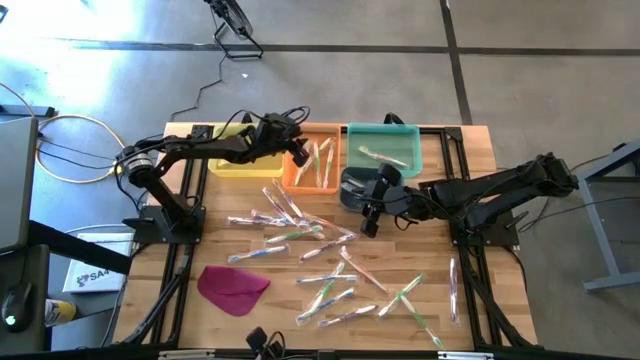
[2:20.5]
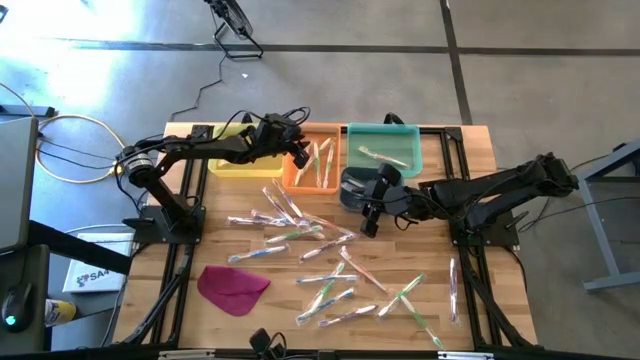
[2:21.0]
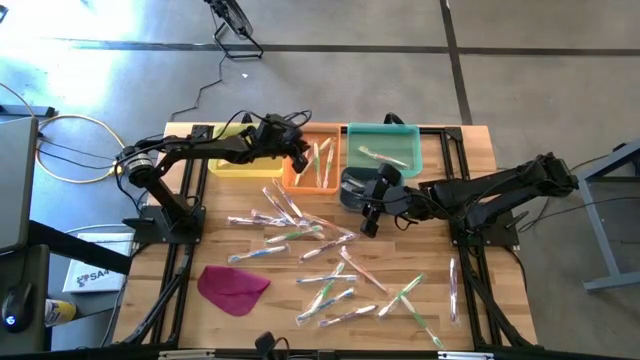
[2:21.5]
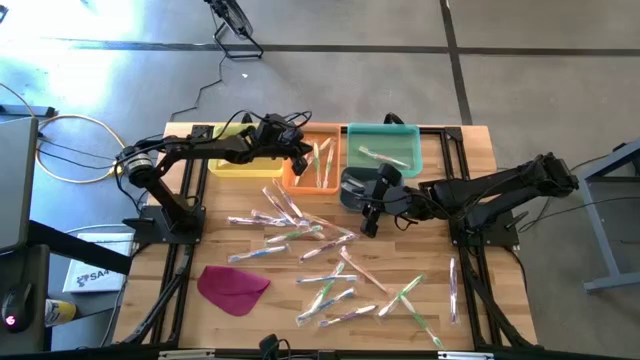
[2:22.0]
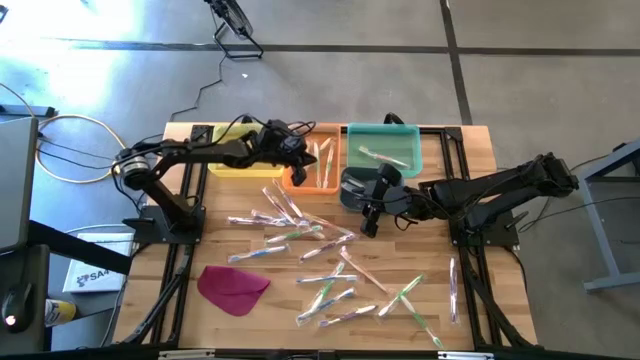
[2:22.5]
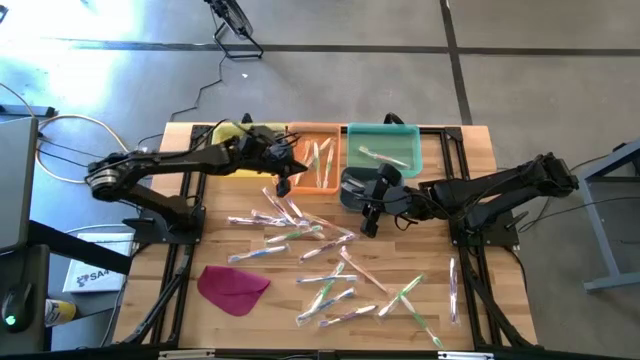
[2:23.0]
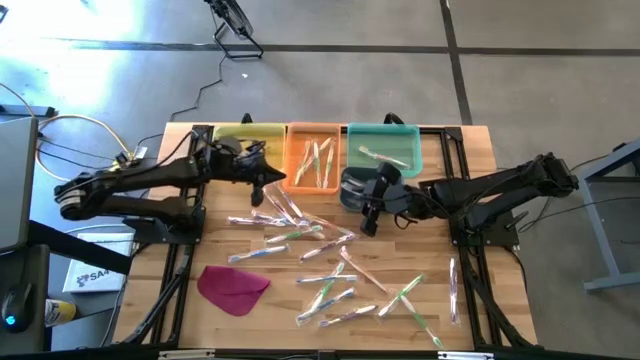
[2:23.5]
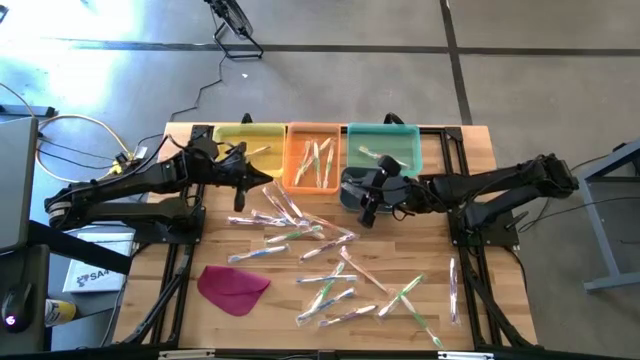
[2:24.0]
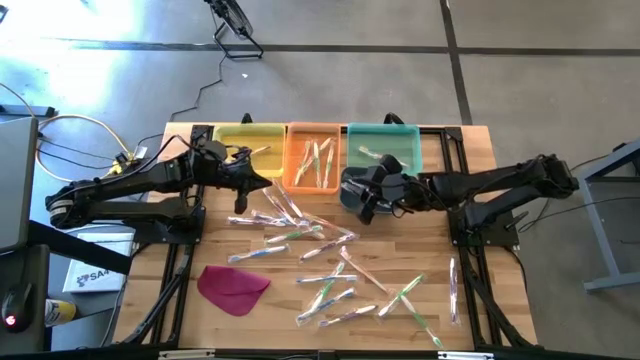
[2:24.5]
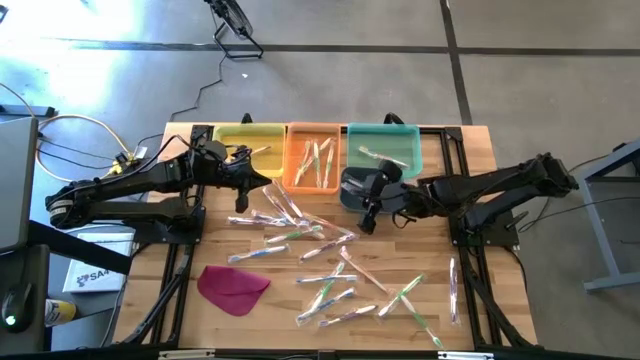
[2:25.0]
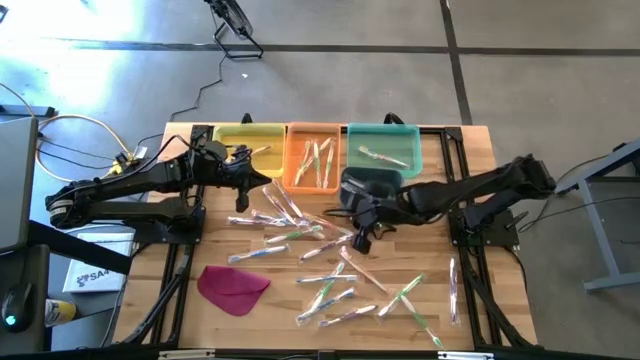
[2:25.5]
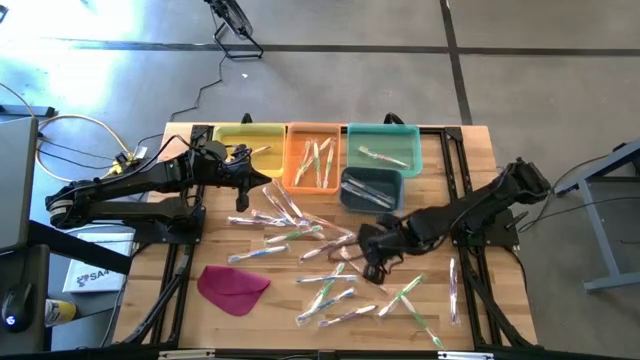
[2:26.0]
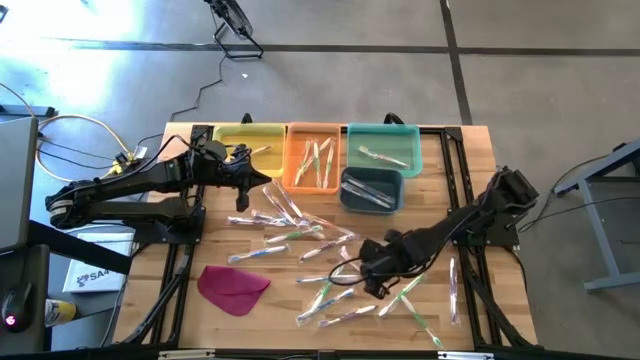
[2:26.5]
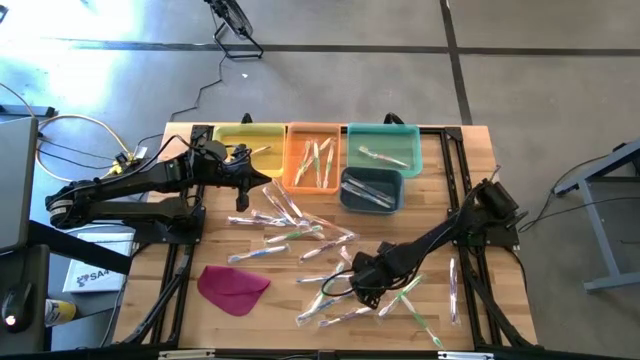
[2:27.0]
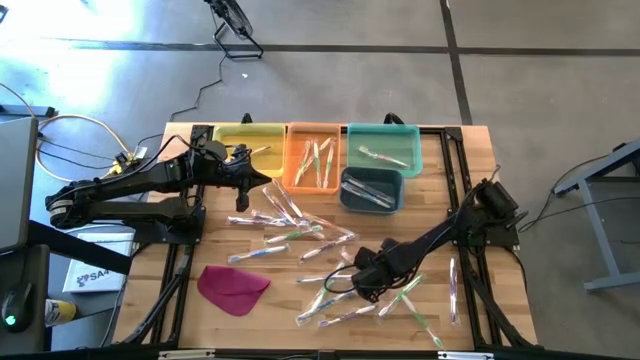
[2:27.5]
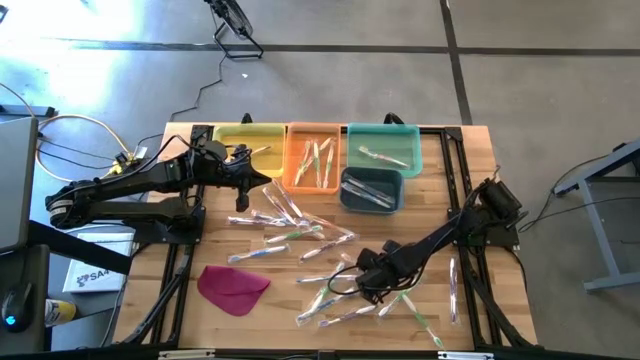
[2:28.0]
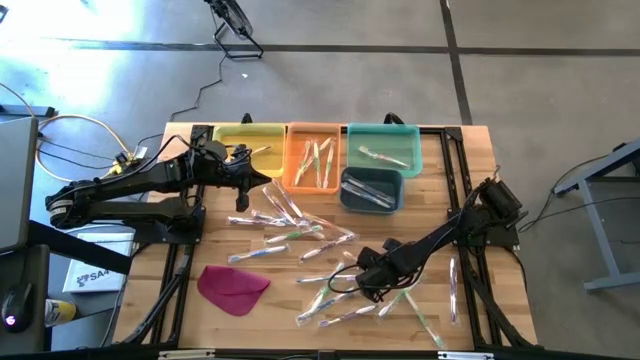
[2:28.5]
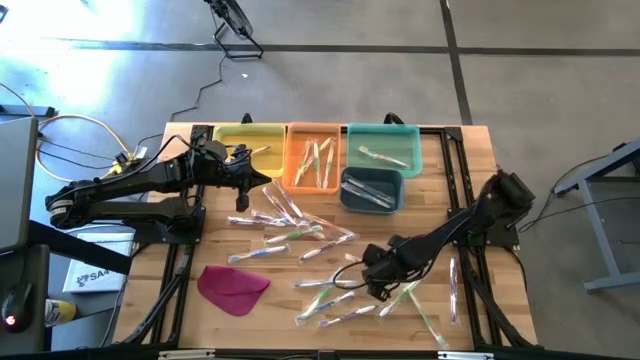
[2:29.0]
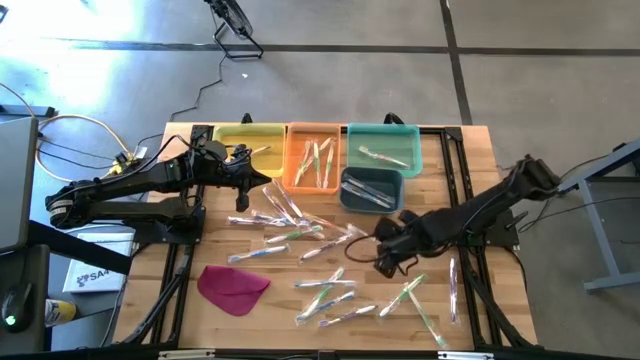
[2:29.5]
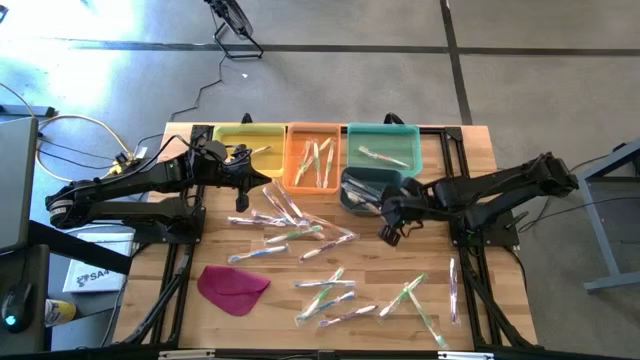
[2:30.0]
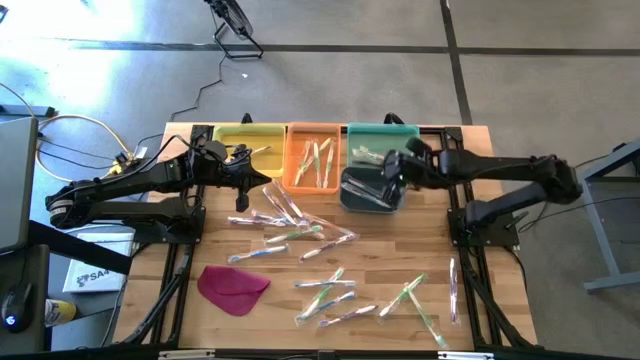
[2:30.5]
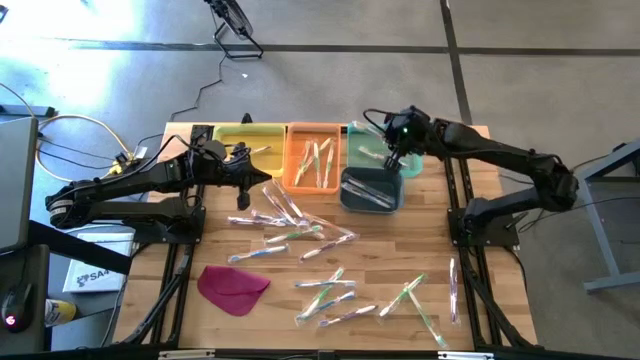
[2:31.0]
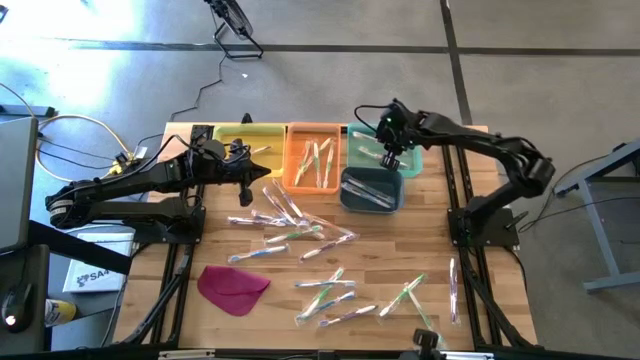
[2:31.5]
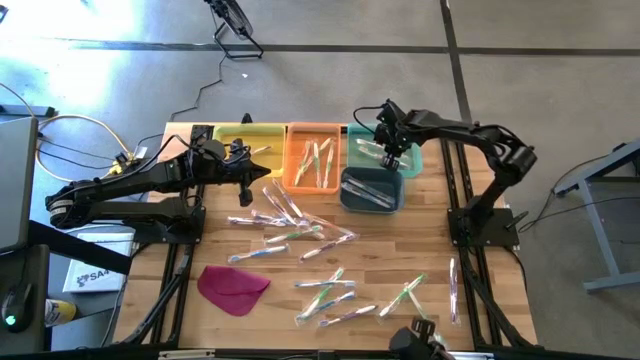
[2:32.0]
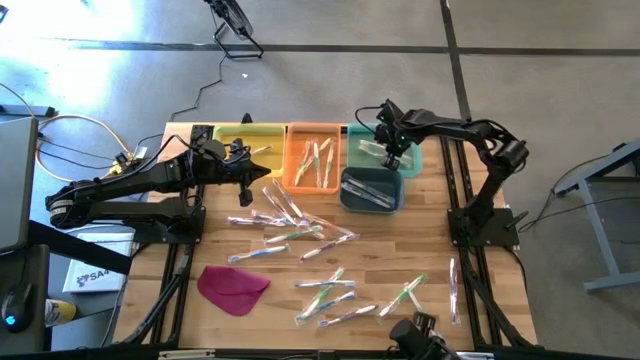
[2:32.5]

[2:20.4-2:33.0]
Task: Pick & Place Toothbrushes
Put the orange toothbrush into the blue bin

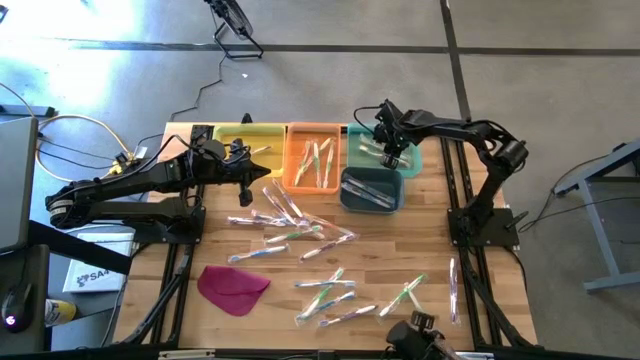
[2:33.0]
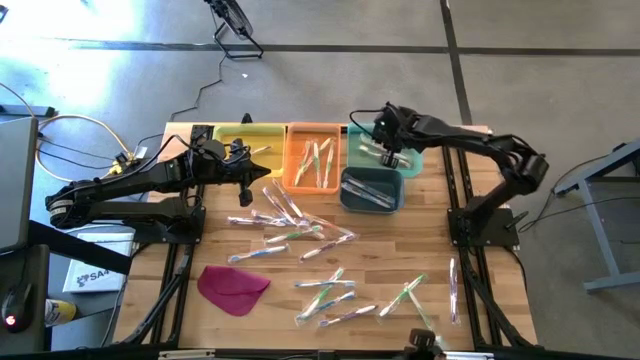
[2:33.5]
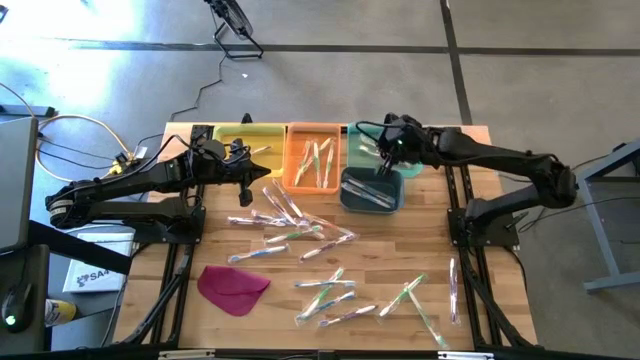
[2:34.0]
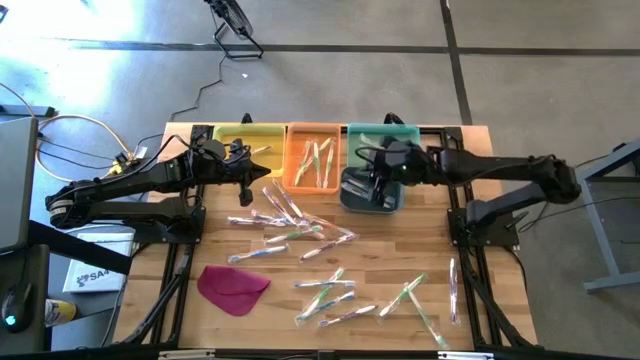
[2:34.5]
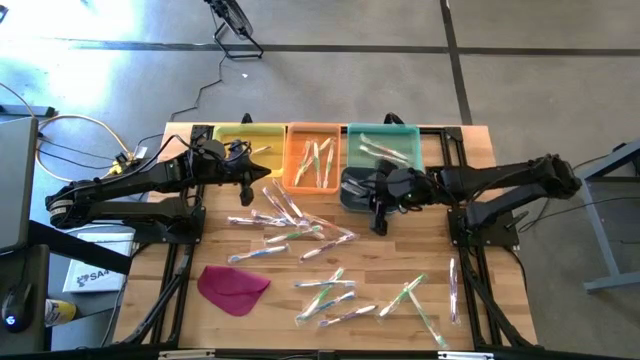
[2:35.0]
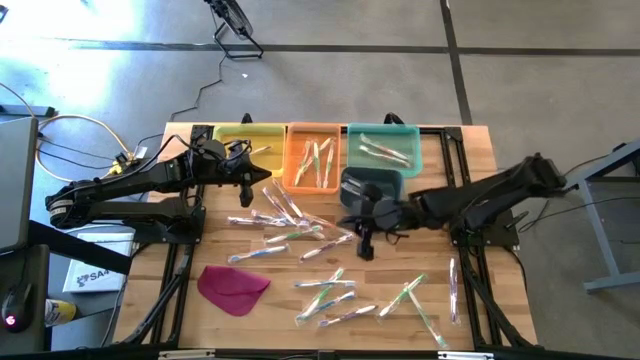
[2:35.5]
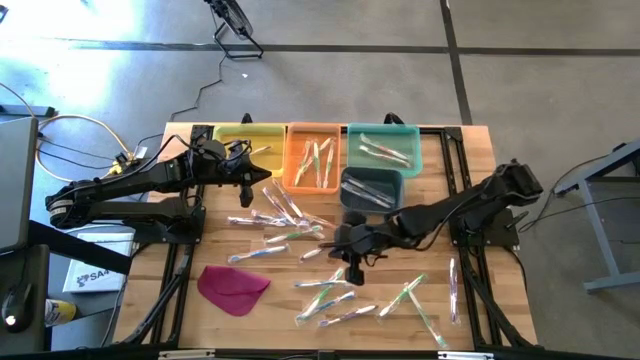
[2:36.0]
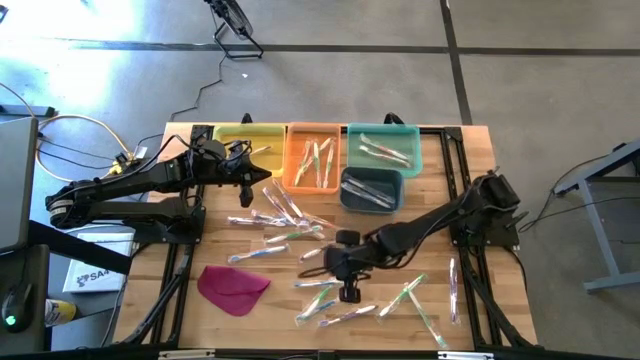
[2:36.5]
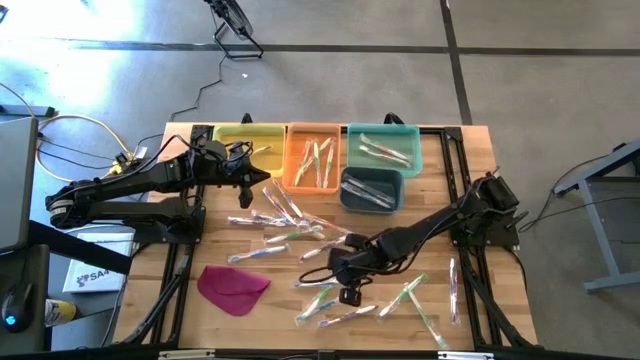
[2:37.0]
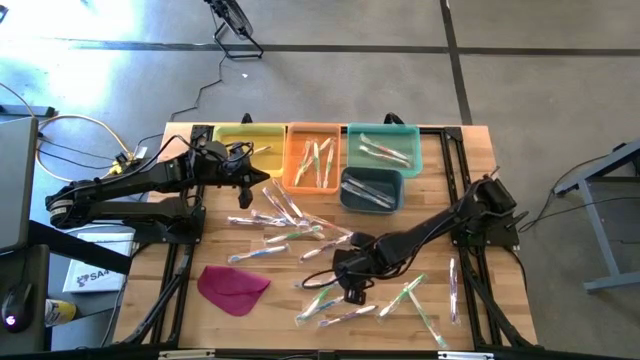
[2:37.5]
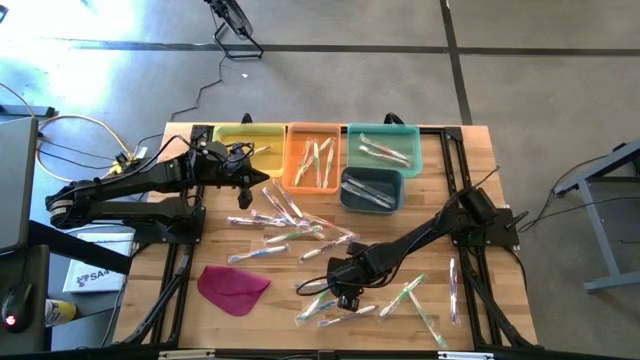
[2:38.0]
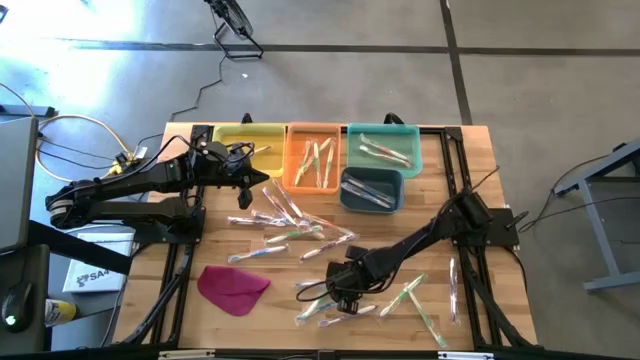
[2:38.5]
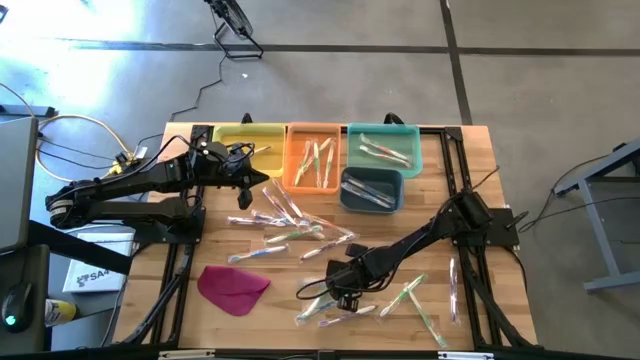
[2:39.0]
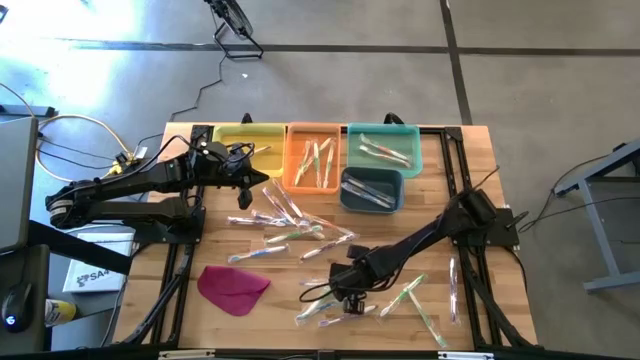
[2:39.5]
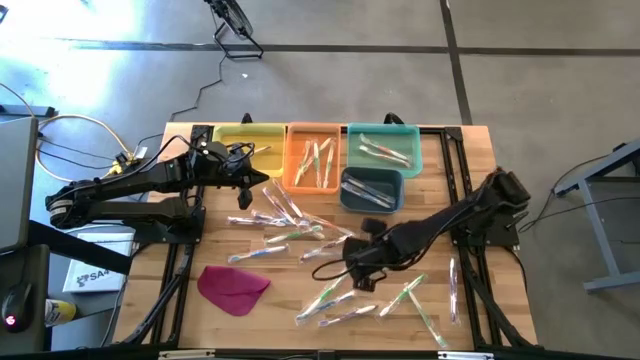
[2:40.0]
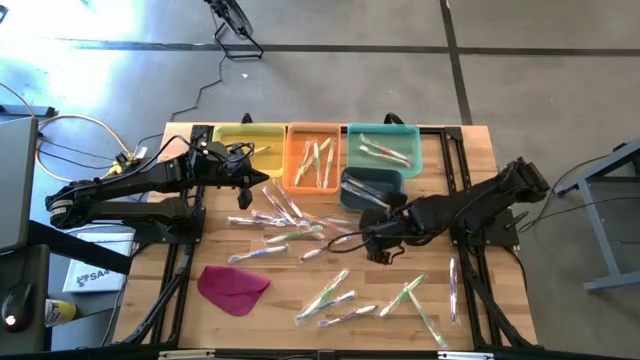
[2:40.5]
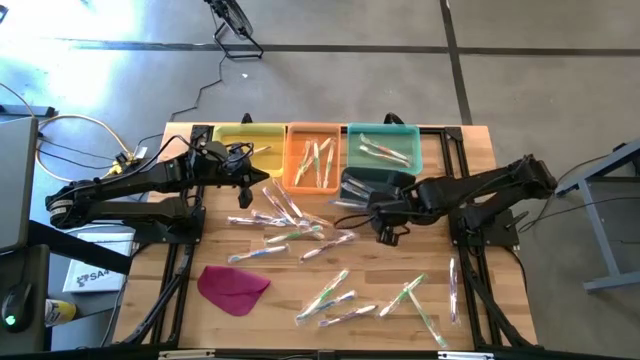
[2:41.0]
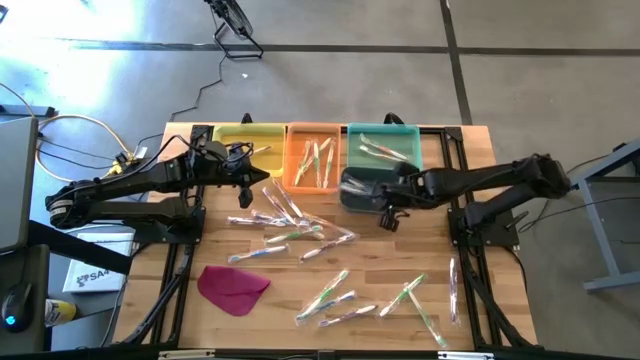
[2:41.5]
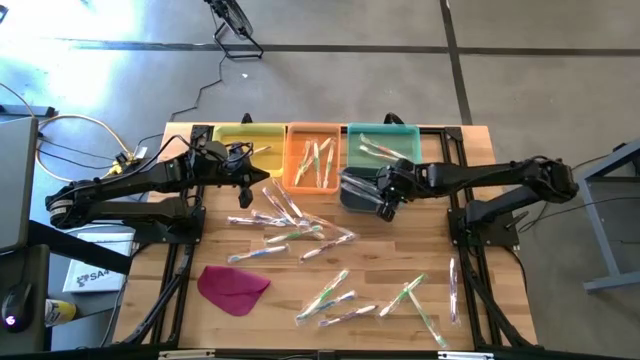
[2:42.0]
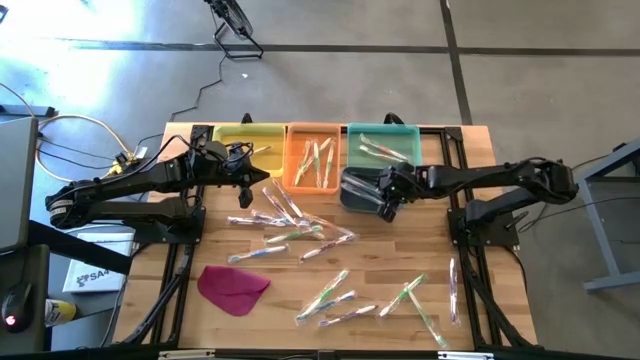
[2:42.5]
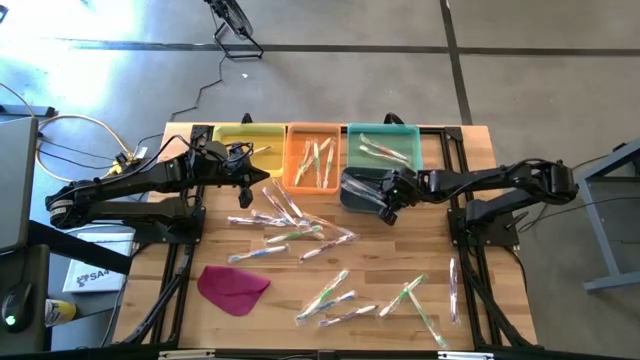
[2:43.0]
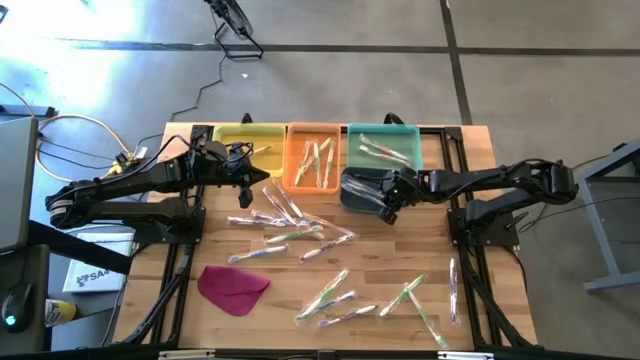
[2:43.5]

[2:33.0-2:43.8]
Put the blue toothbrush into the dark blue bin
